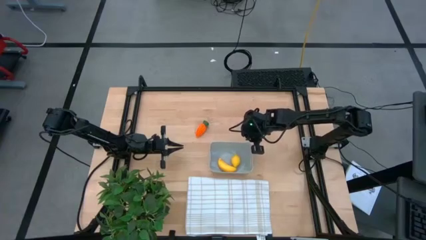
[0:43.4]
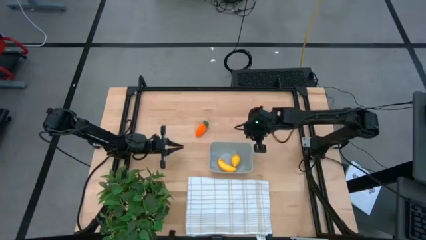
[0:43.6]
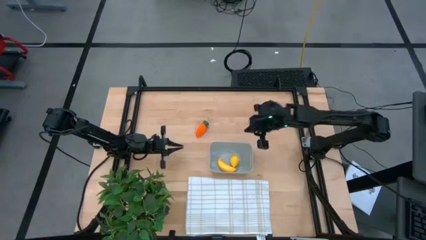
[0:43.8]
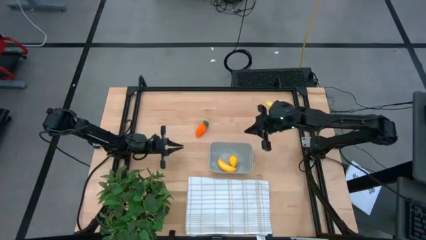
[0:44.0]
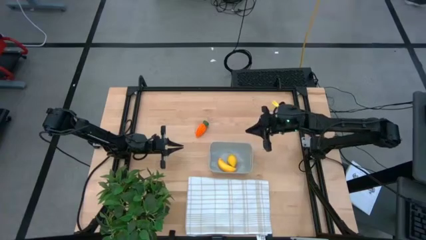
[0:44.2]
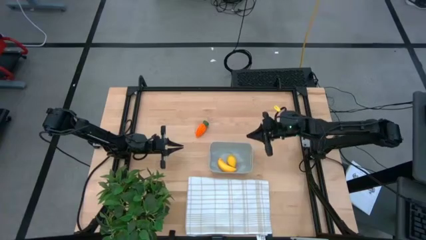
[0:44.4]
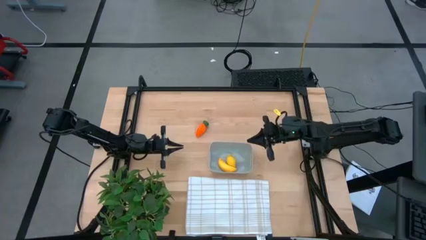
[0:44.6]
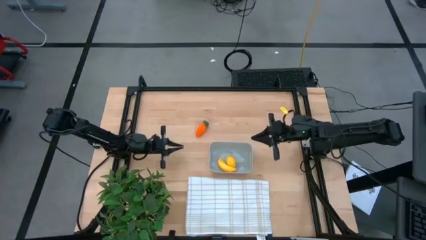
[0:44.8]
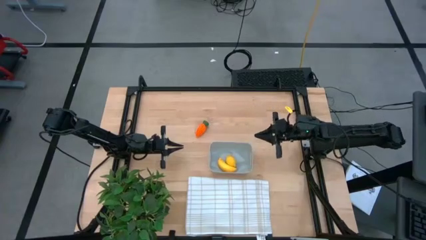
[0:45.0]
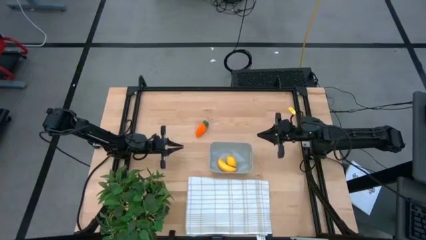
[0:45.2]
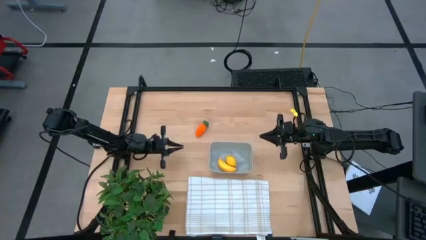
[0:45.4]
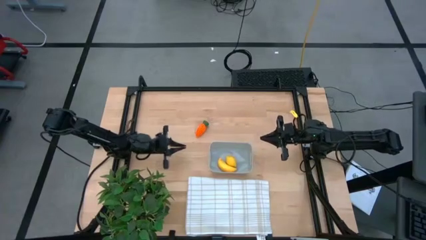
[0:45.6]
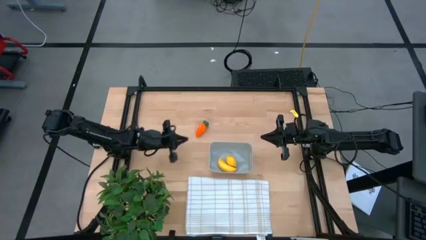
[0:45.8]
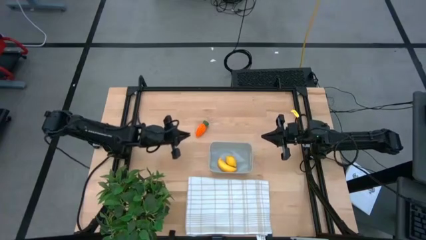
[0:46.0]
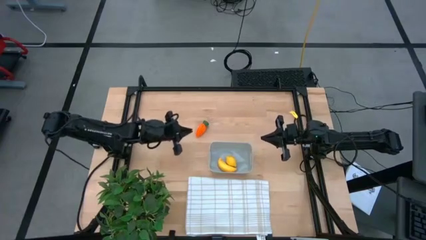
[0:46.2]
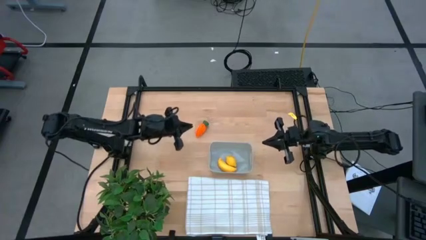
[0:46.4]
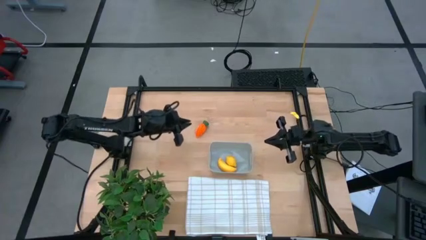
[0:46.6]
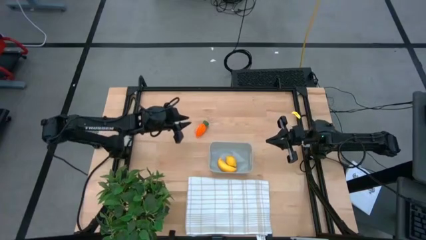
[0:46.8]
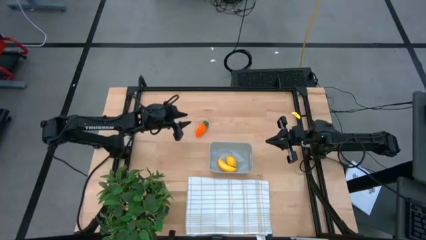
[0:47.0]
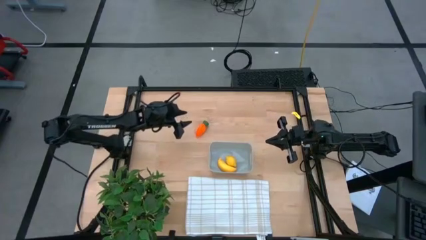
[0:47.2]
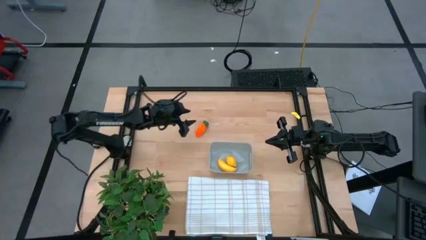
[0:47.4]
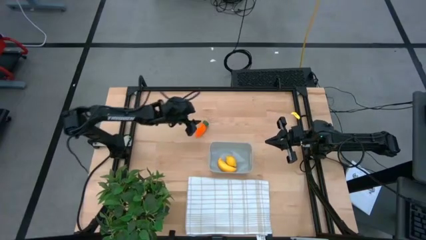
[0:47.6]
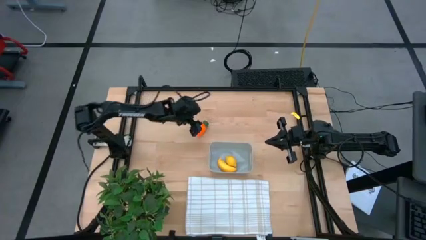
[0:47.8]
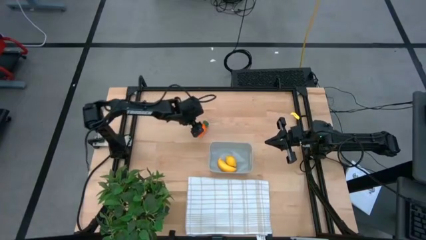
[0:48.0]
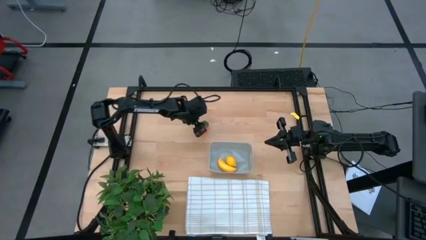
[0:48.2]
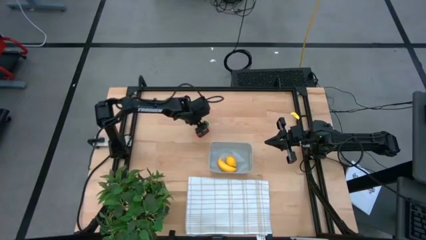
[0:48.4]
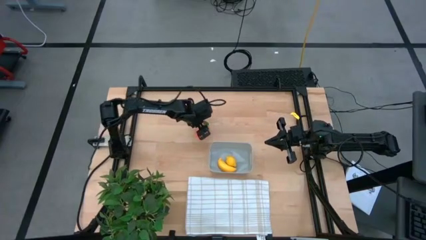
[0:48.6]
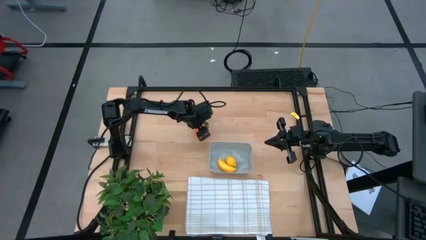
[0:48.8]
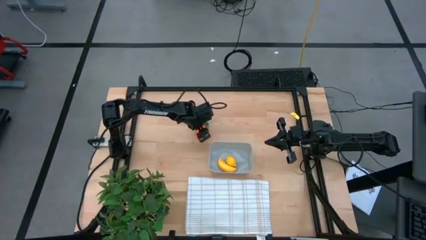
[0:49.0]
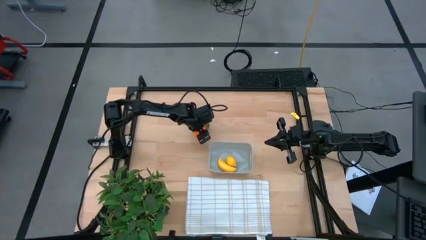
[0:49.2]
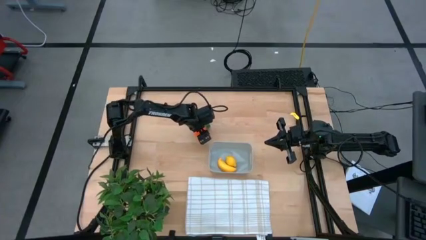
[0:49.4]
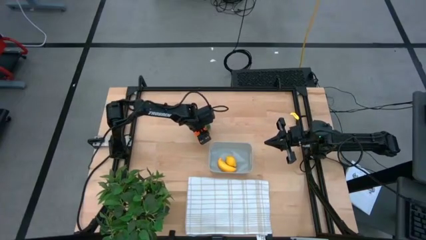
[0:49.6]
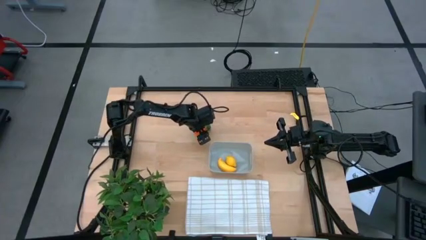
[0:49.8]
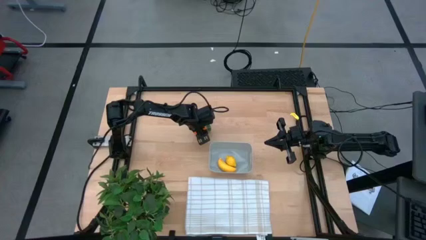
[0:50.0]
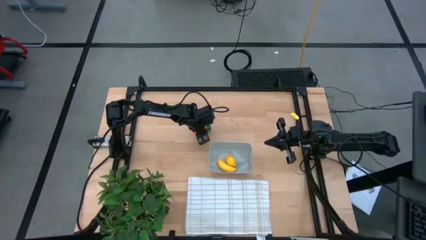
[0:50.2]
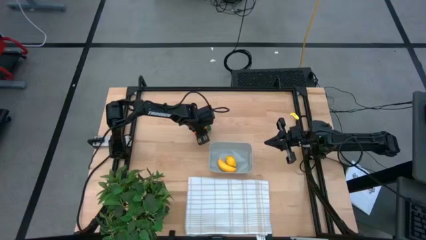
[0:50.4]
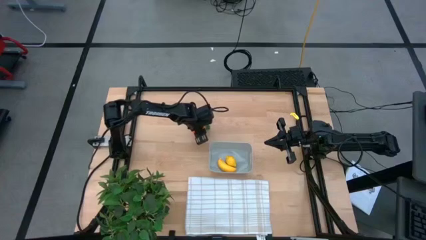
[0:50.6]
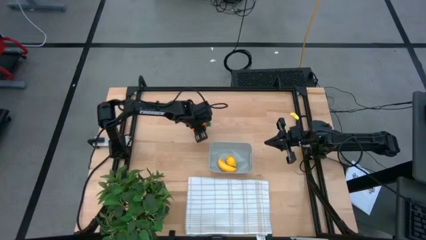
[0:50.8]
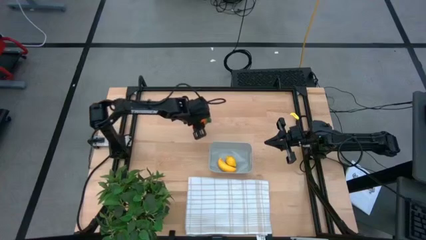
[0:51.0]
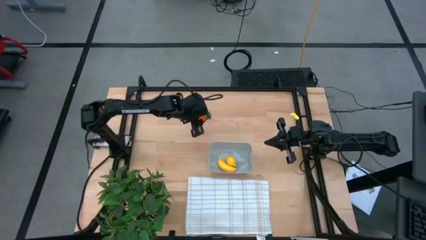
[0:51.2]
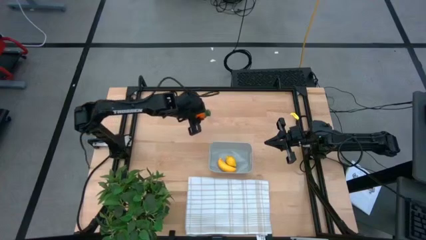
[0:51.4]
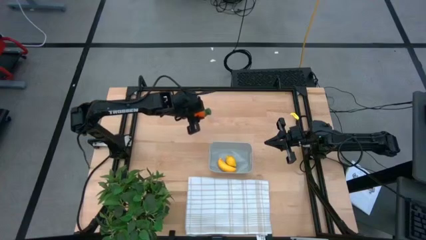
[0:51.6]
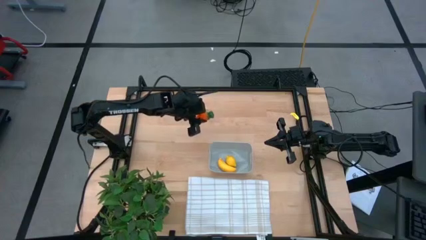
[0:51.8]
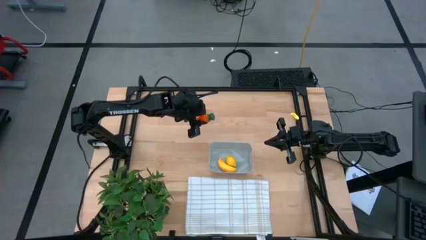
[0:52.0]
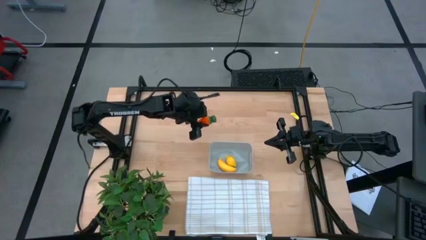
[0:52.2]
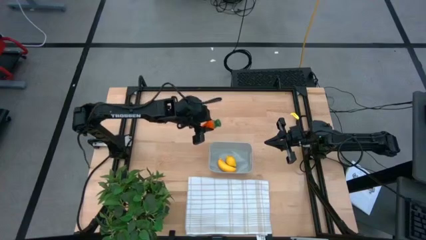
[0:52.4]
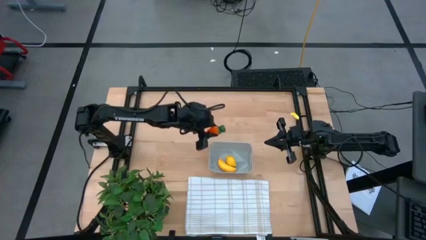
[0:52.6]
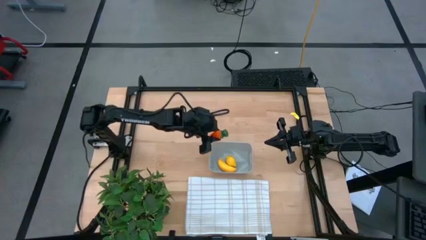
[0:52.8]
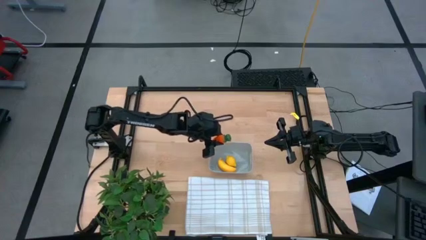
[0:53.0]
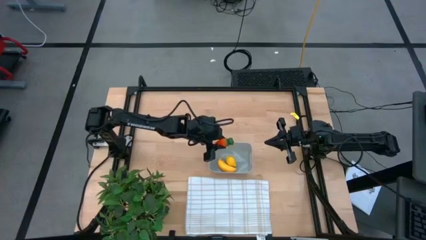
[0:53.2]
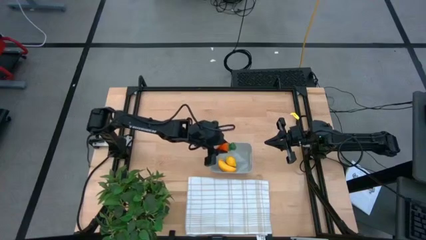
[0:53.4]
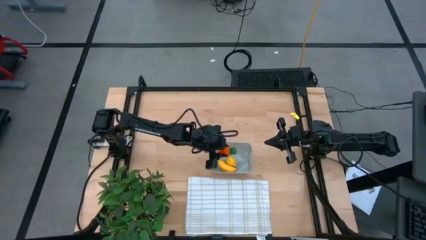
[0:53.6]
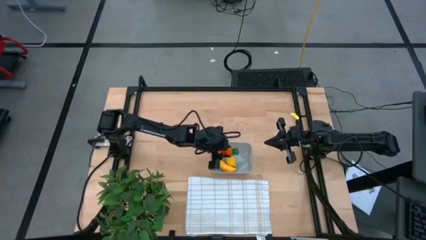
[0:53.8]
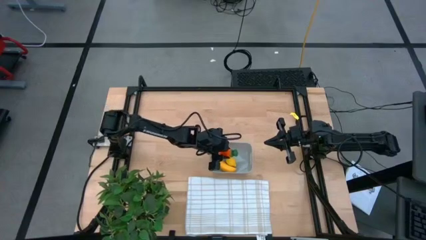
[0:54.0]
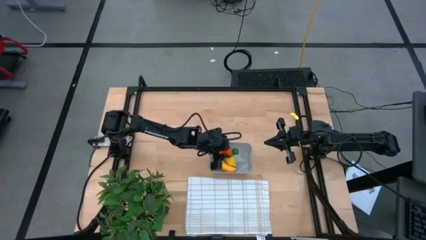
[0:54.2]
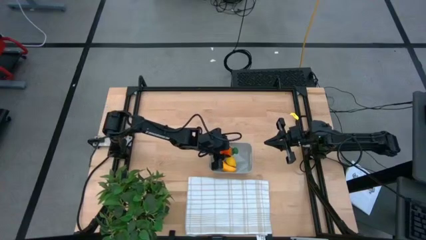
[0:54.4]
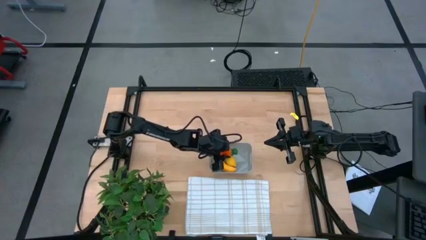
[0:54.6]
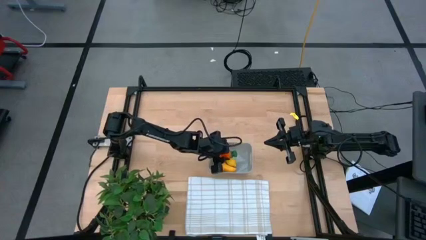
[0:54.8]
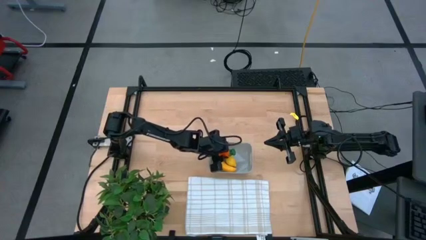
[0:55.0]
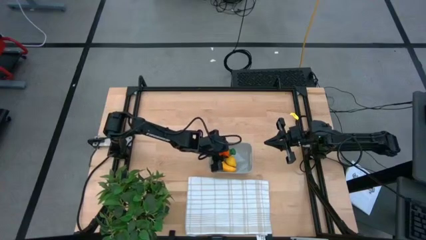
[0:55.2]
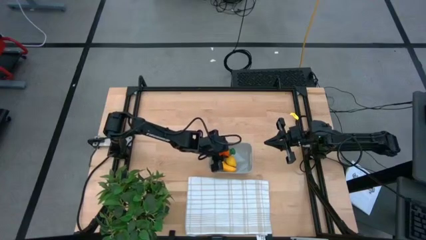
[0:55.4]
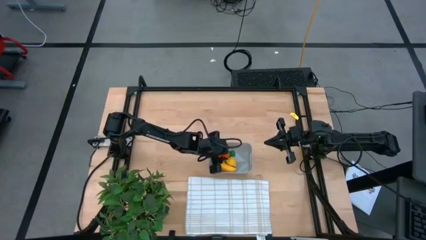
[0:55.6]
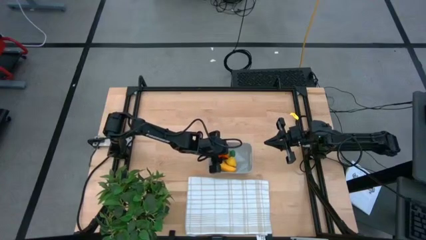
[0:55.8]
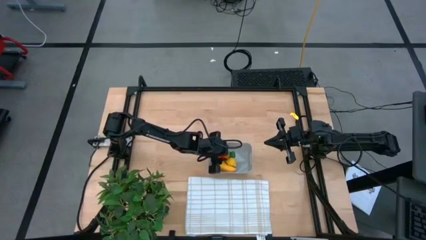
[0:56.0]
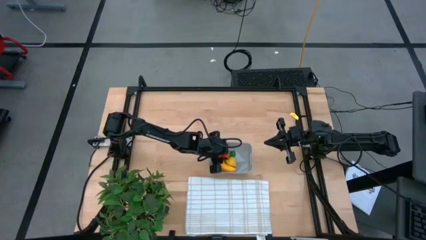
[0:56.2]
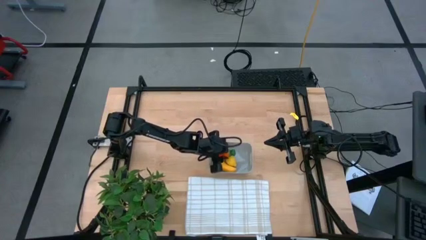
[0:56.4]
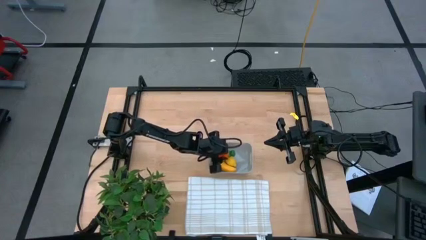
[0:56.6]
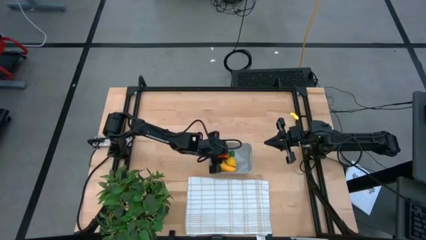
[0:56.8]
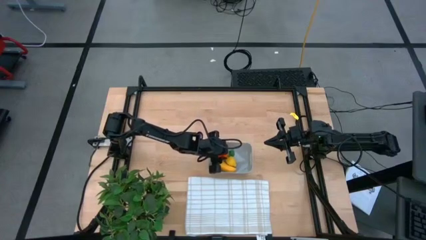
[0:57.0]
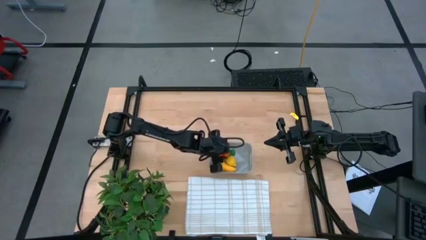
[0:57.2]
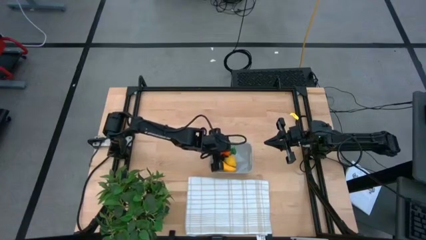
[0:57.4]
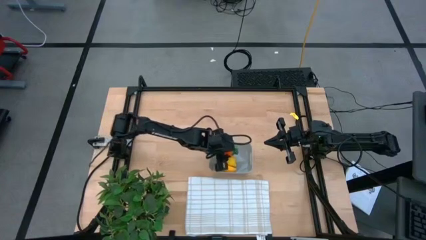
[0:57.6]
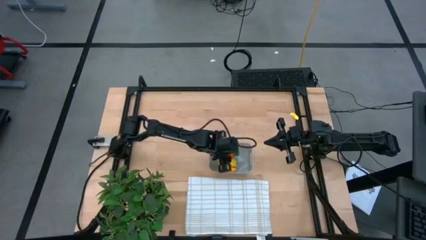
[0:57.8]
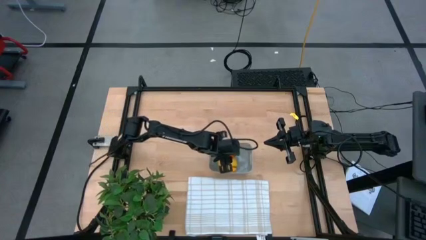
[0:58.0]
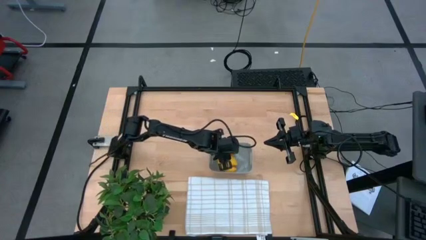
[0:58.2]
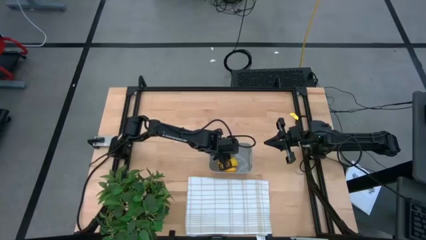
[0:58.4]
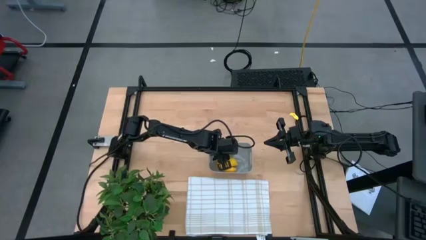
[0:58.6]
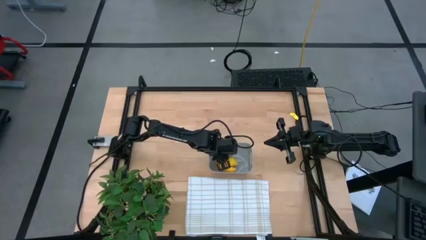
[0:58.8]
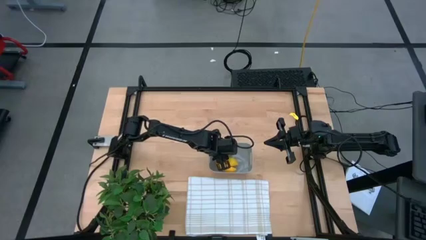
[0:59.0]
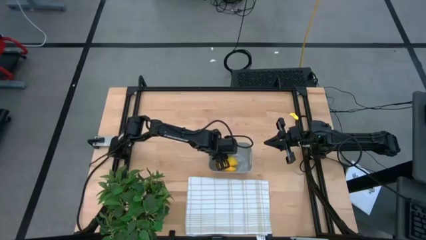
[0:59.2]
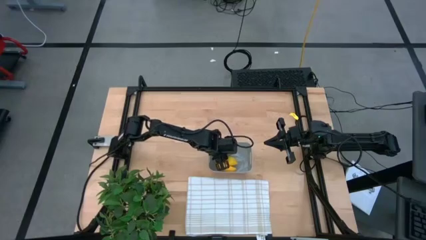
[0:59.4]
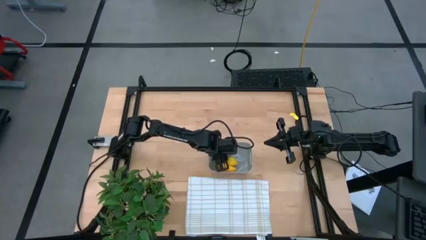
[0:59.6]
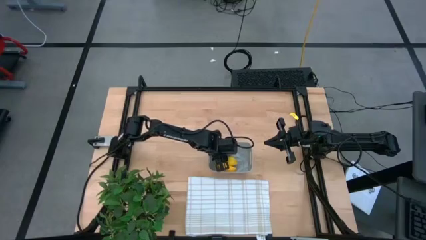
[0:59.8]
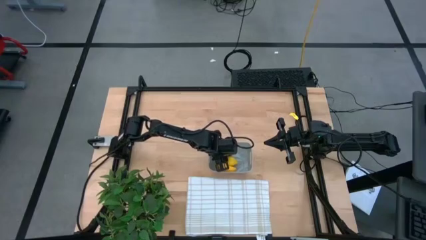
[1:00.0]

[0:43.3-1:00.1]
Task: Pick and placing Produce into tupperware
Put the carrot into the gray bin
